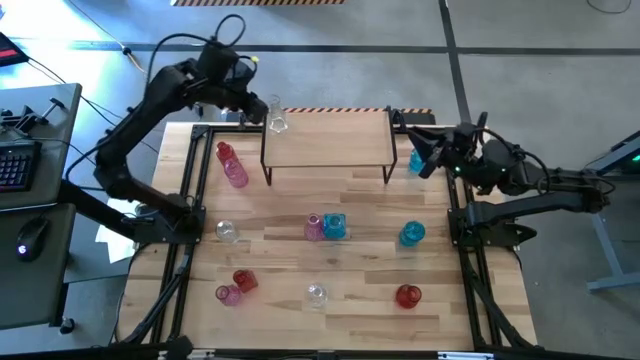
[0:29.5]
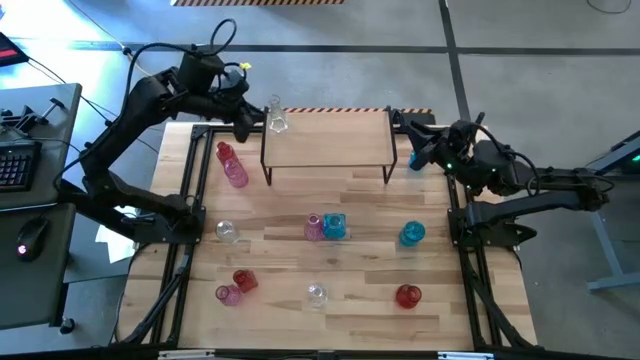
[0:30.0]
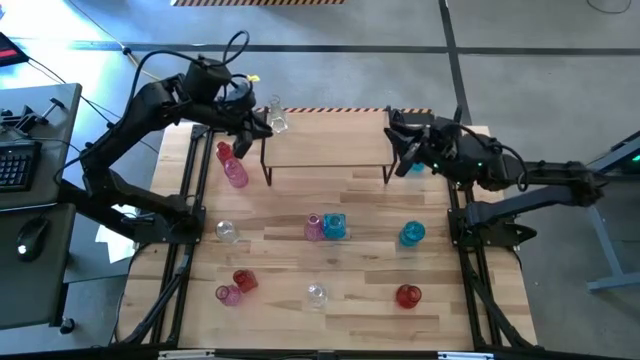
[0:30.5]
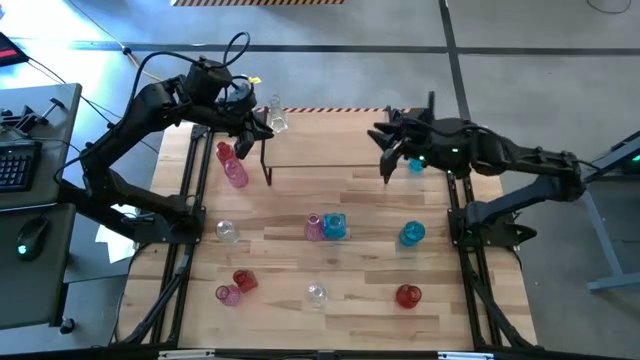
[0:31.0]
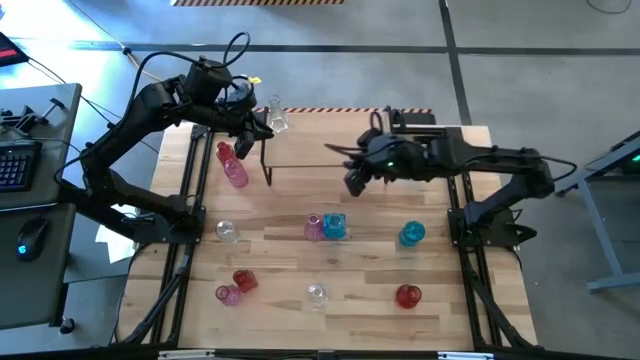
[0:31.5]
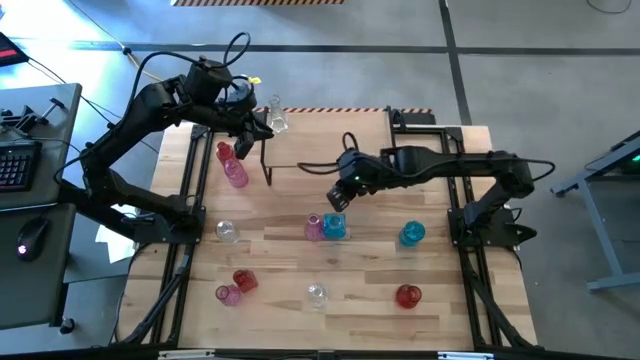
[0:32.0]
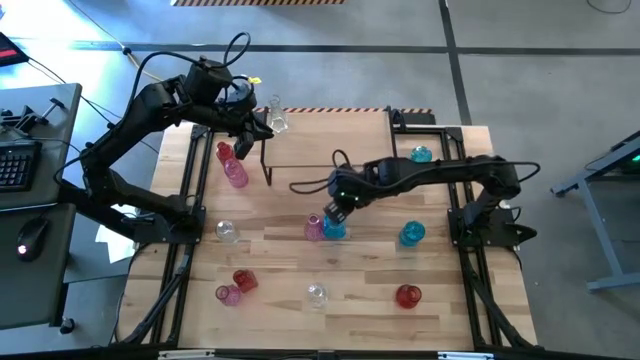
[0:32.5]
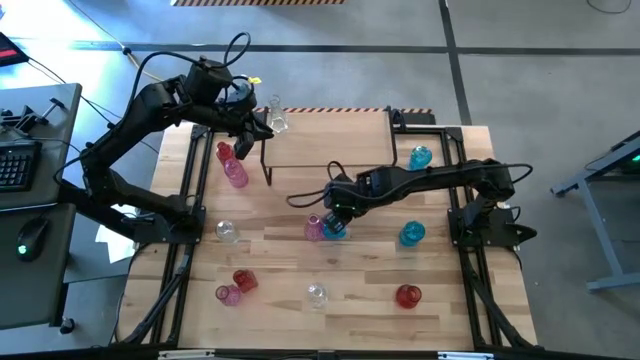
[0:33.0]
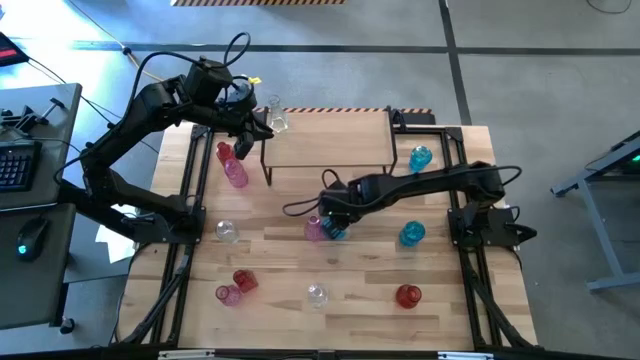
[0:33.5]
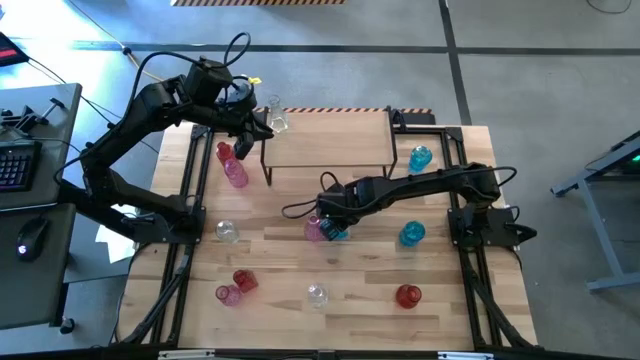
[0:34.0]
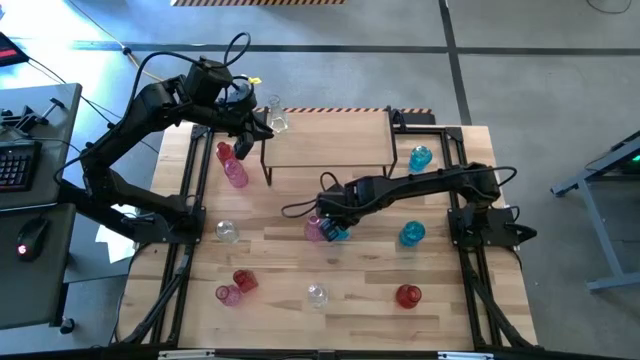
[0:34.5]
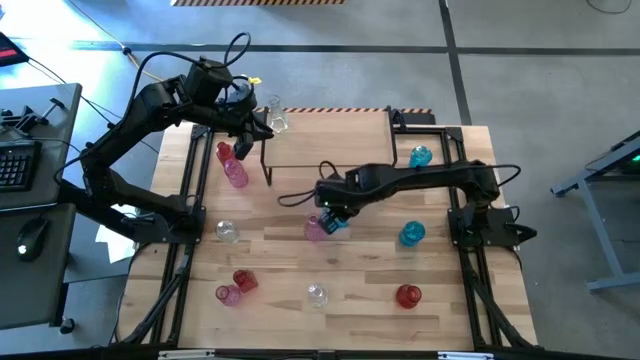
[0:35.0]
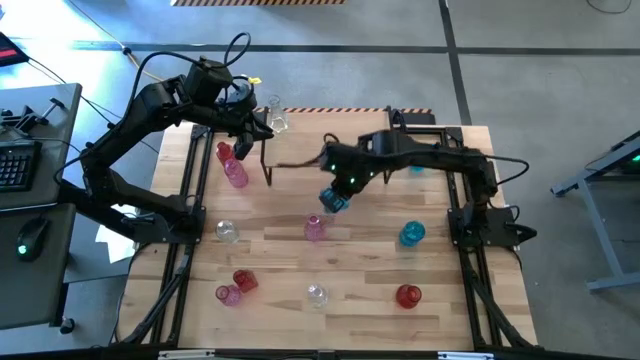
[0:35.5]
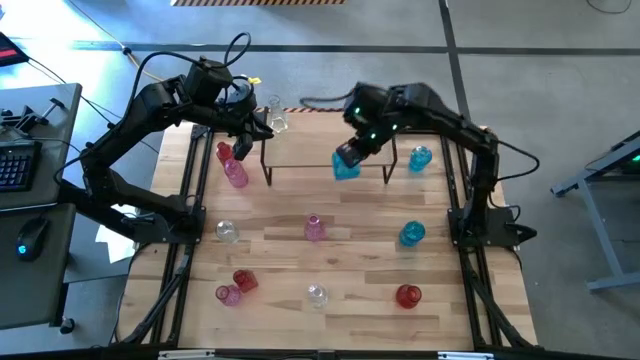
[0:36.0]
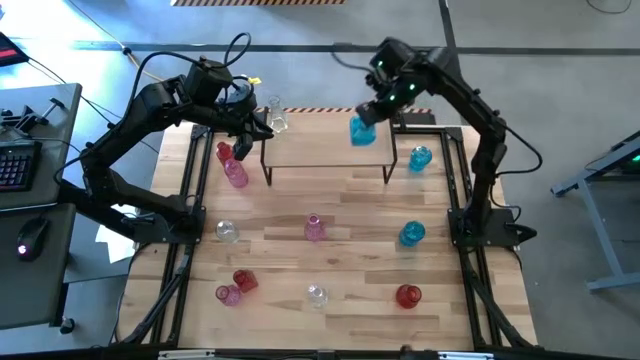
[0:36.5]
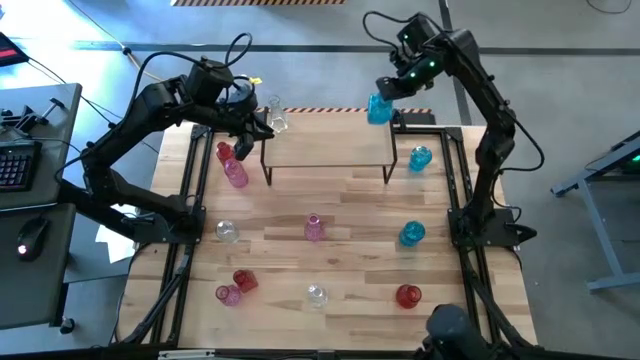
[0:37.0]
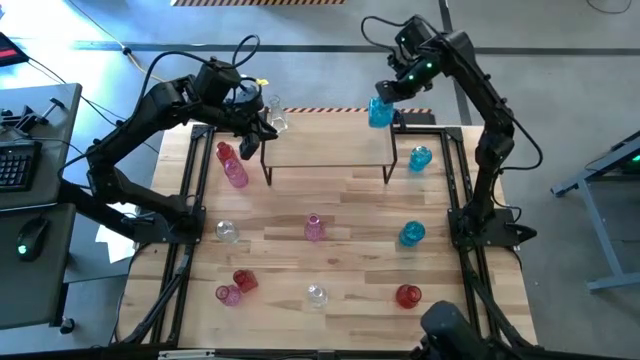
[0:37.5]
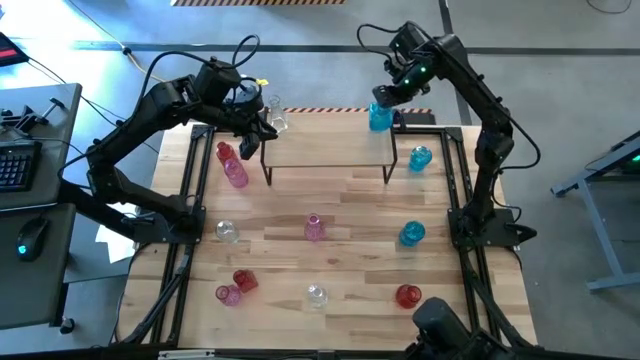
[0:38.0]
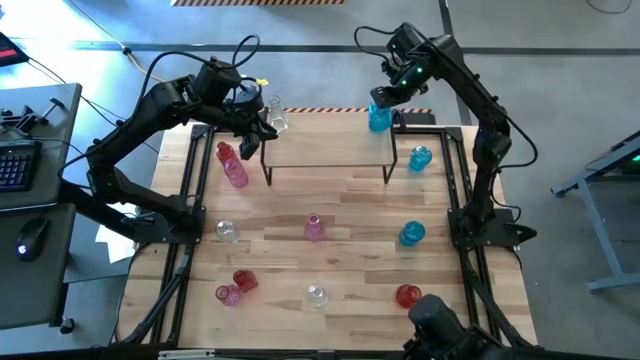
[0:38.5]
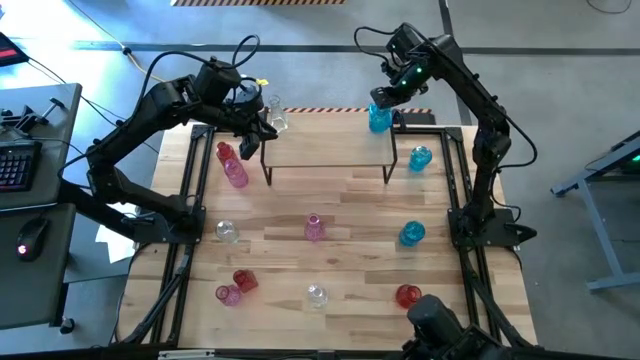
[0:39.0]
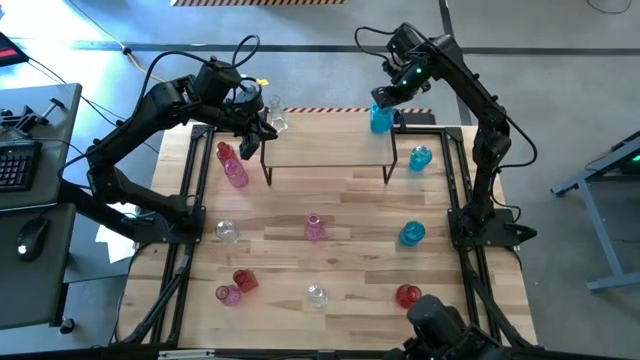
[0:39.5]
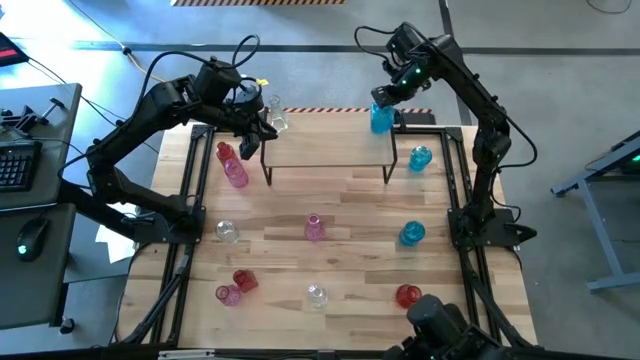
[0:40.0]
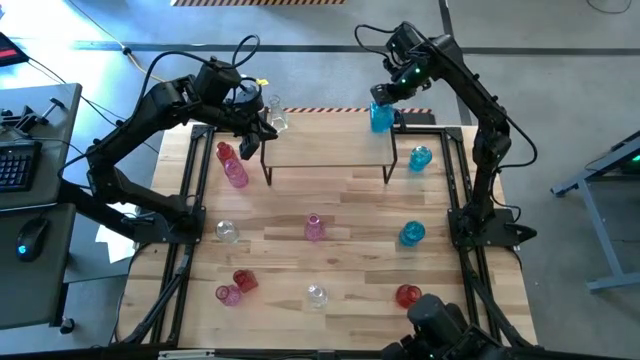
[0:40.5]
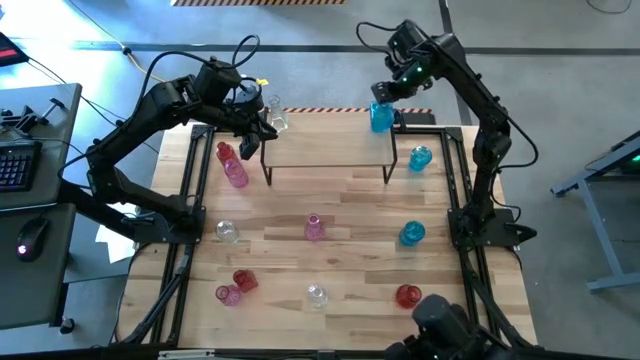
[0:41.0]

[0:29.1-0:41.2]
Task: sort vases onto shelf
Put the left blue vase on the shelf
